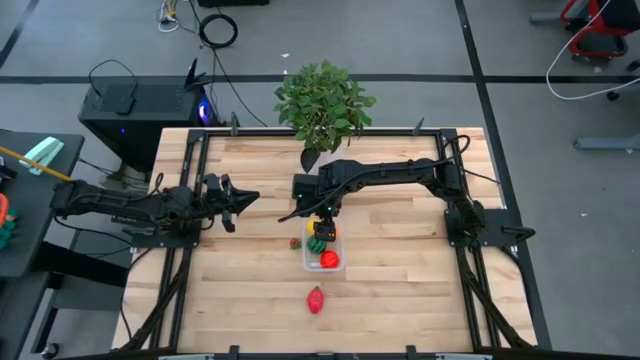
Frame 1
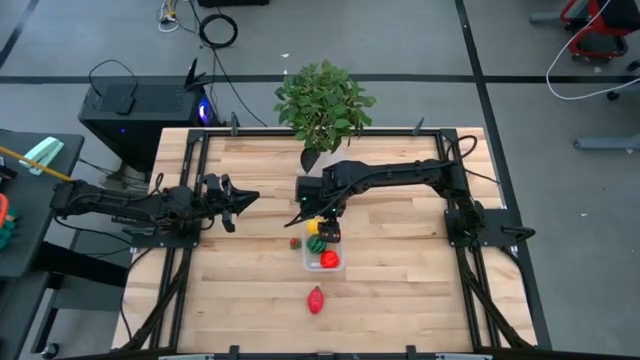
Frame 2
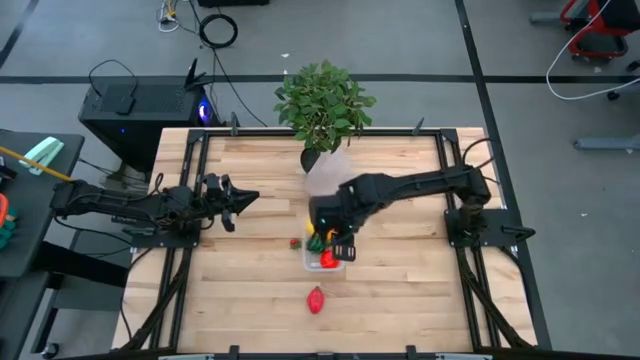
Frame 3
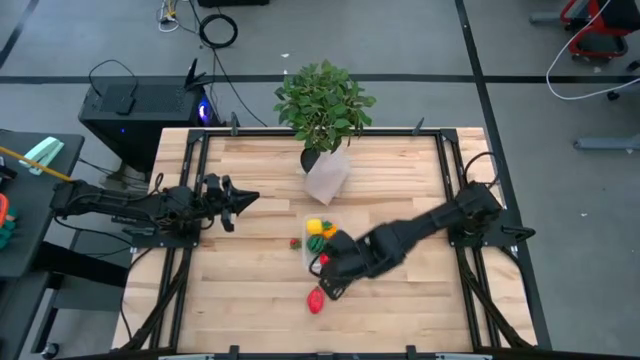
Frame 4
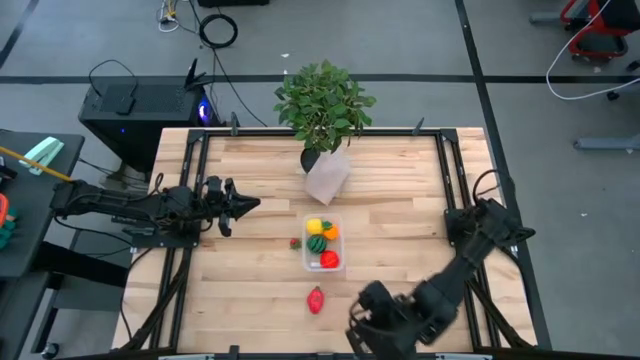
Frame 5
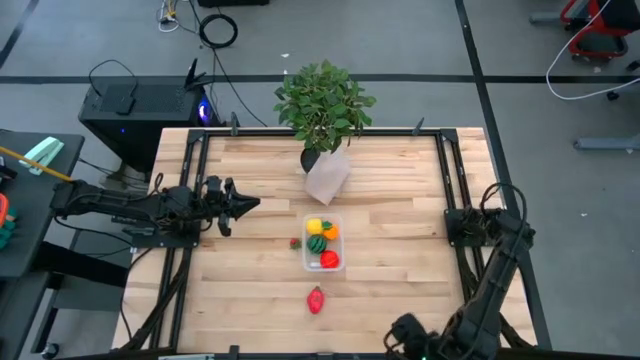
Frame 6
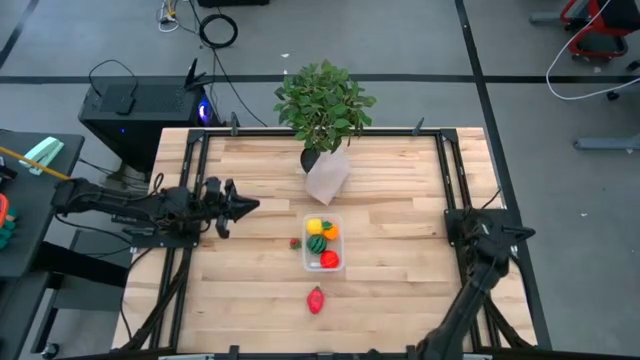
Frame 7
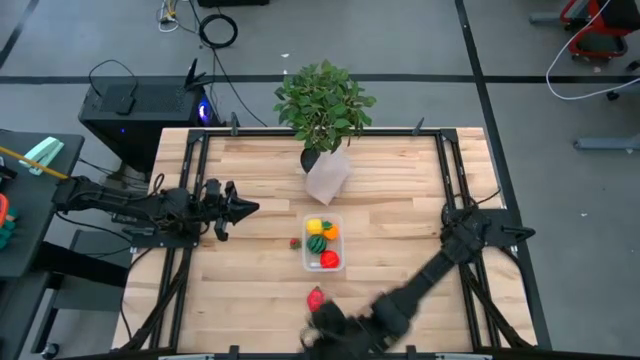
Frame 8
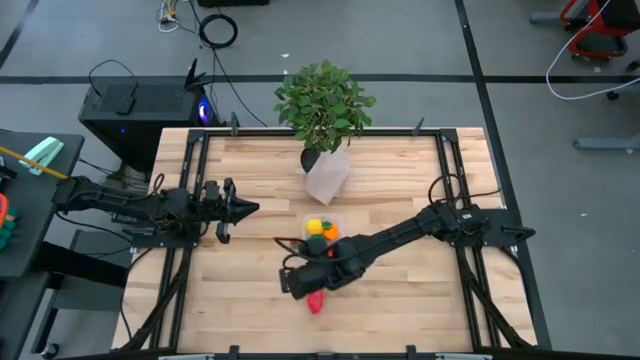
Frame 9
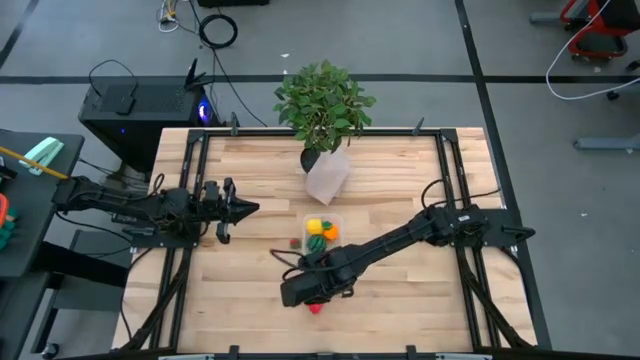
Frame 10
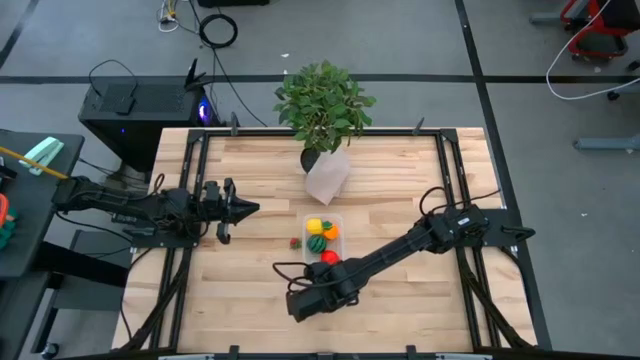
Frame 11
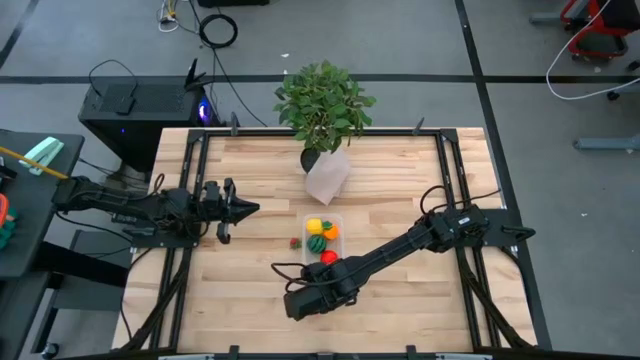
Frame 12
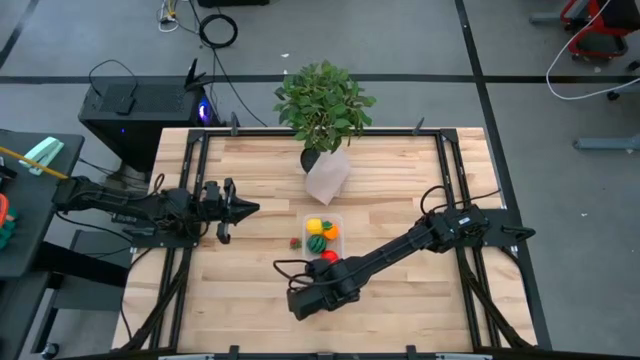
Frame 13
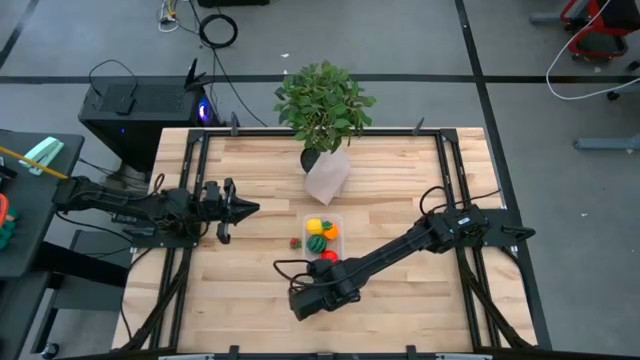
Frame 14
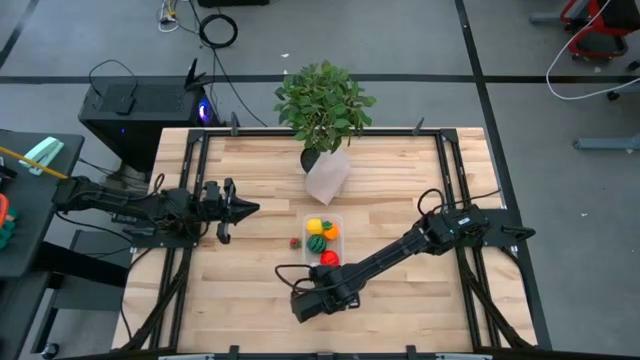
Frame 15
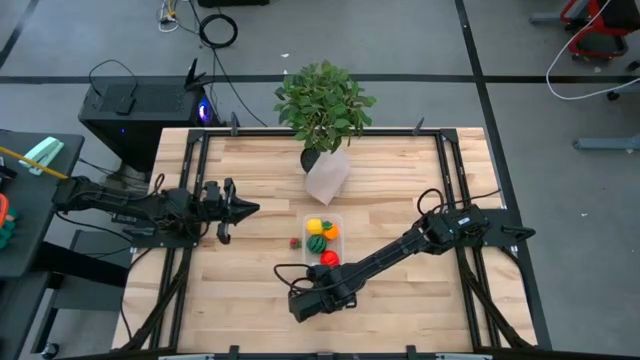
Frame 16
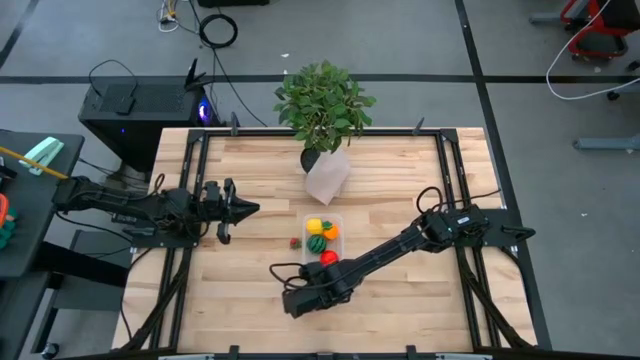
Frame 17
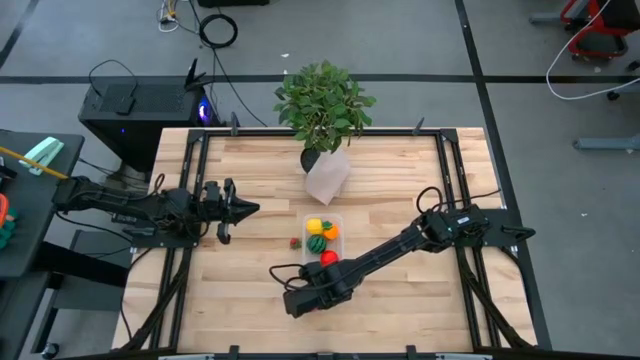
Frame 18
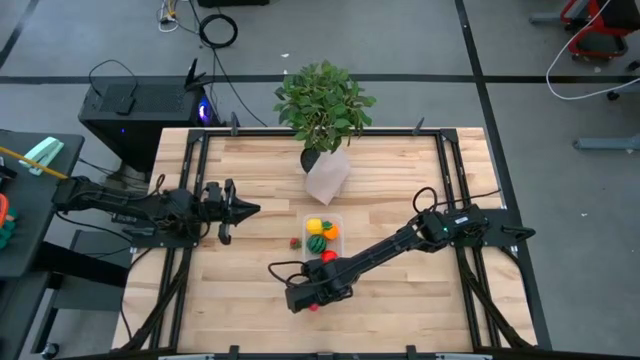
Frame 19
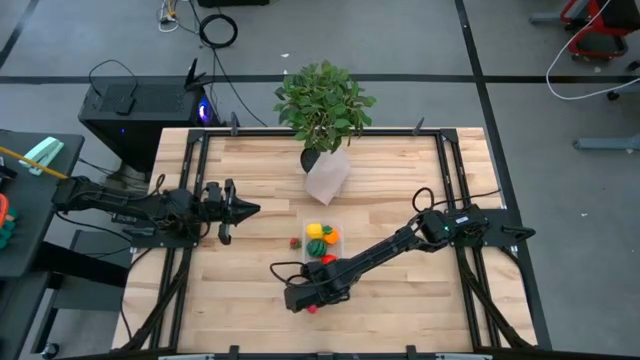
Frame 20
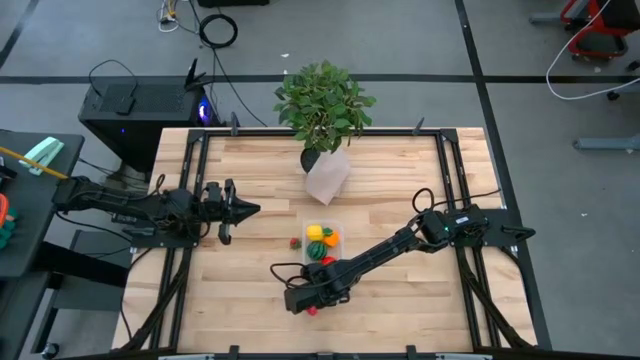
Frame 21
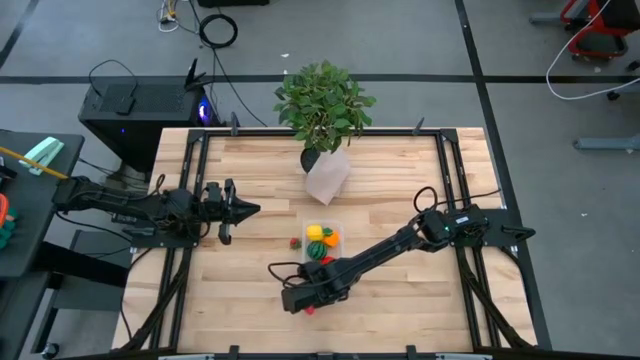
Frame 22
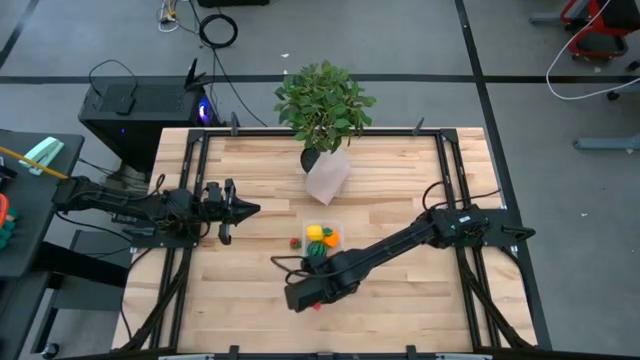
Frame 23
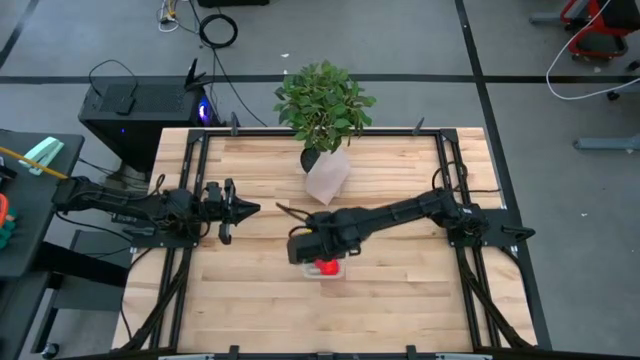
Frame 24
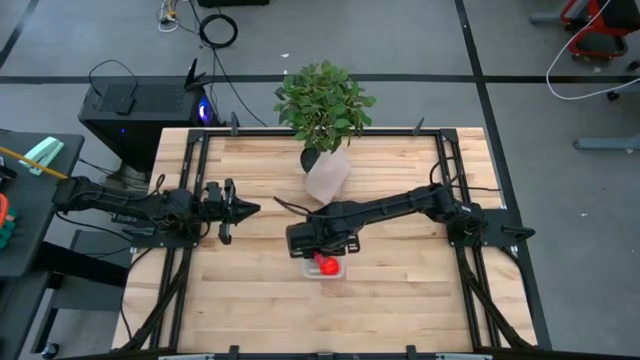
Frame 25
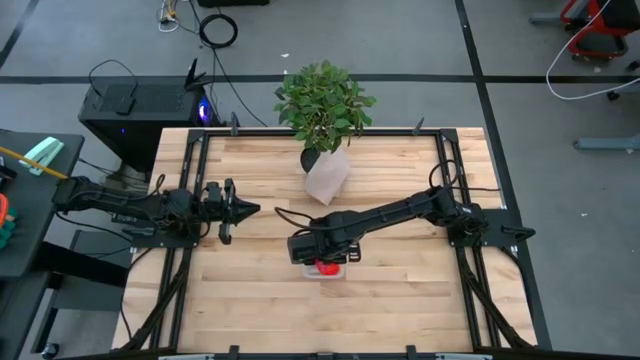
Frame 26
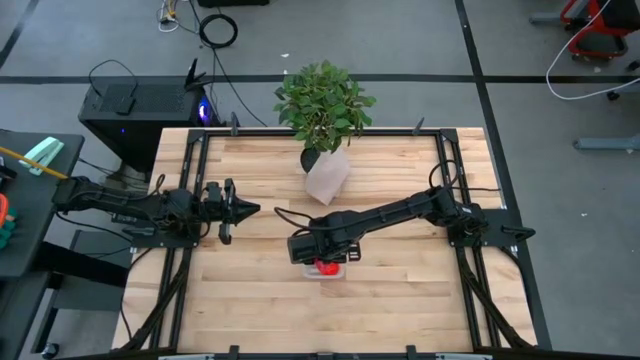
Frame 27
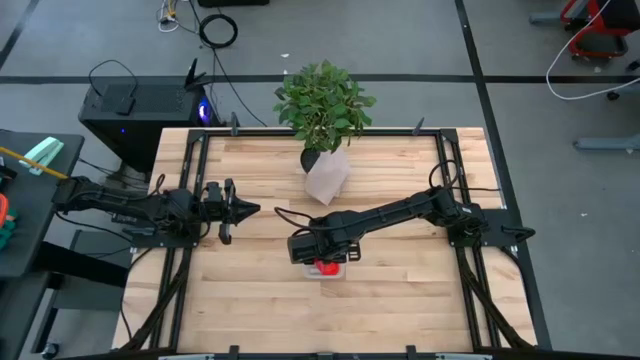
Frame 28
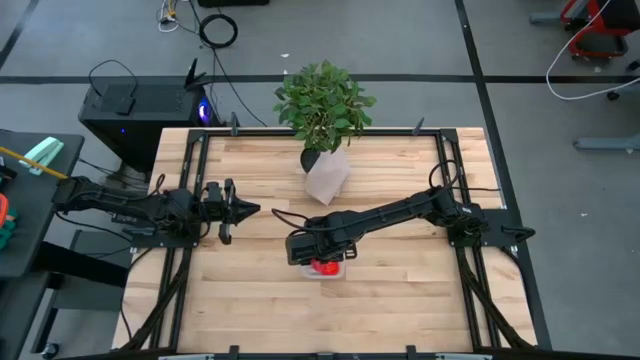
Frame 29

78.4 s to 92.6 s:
Task: Pick and placing Produce into tupperware
Put the red dragon fruit into the transparent bin

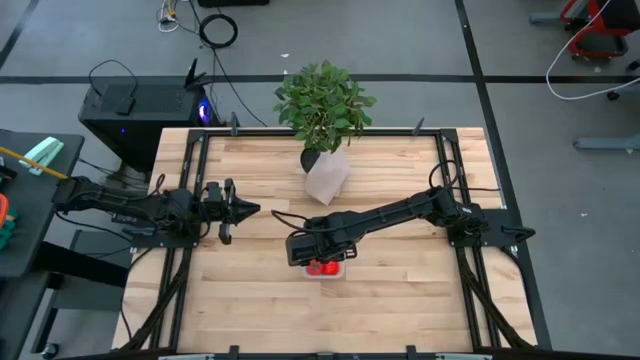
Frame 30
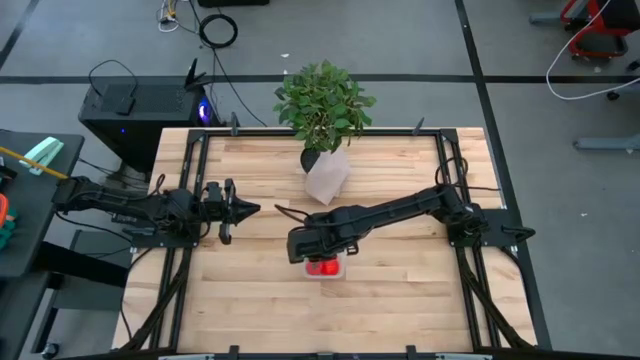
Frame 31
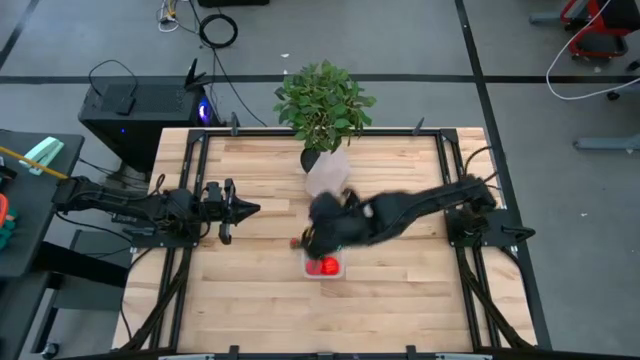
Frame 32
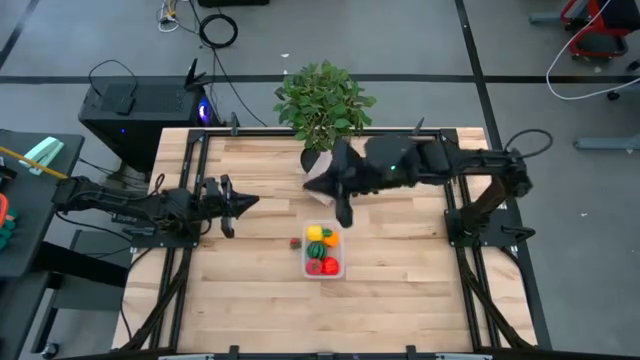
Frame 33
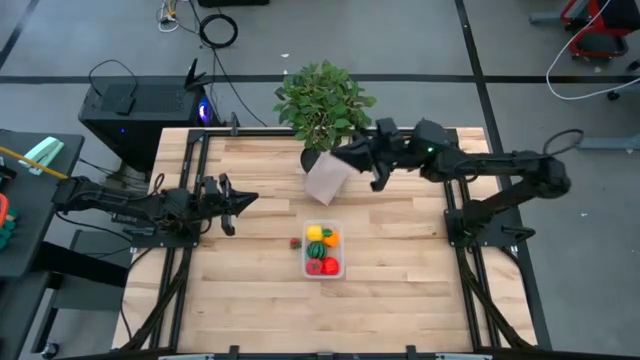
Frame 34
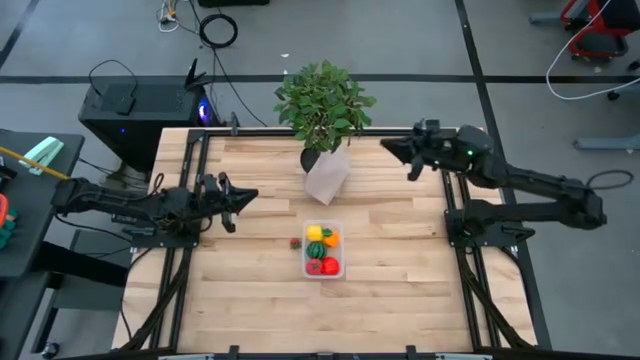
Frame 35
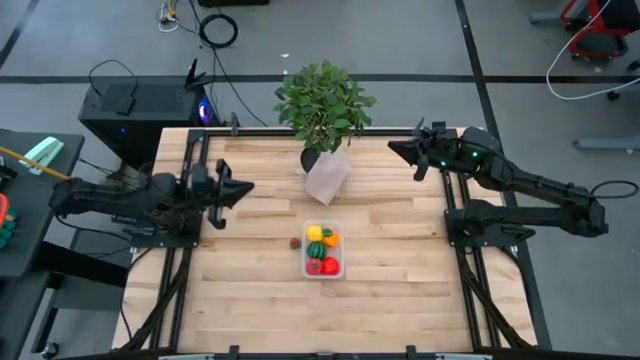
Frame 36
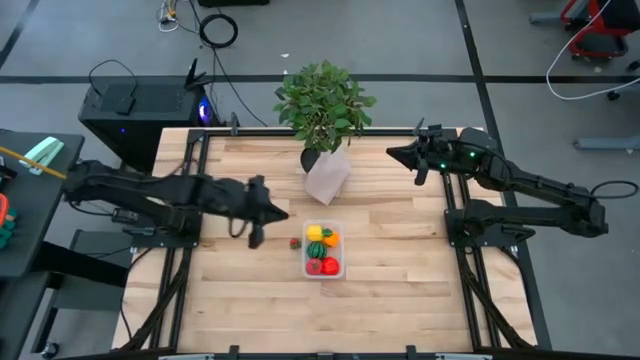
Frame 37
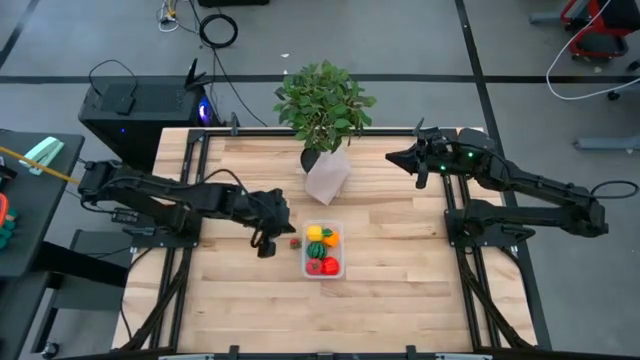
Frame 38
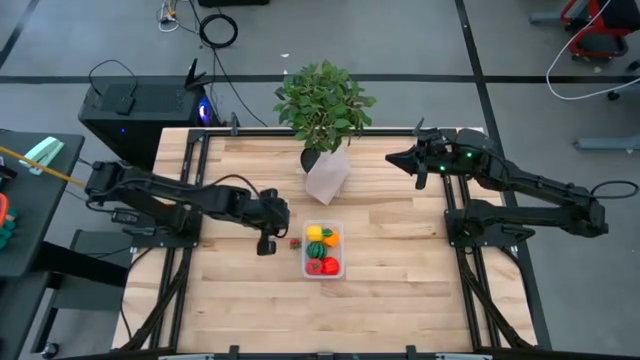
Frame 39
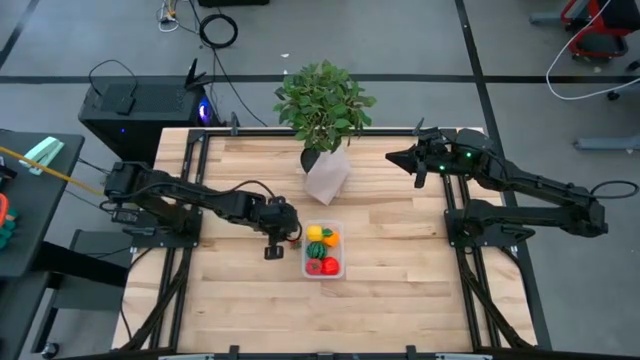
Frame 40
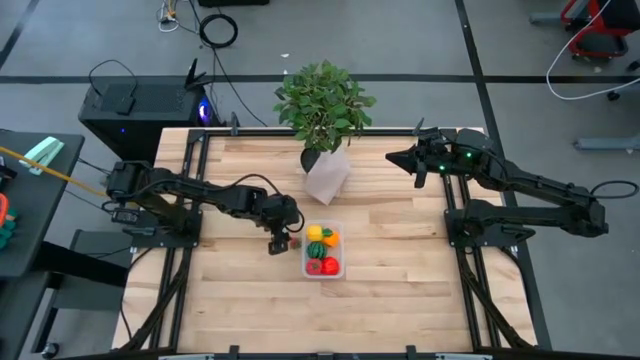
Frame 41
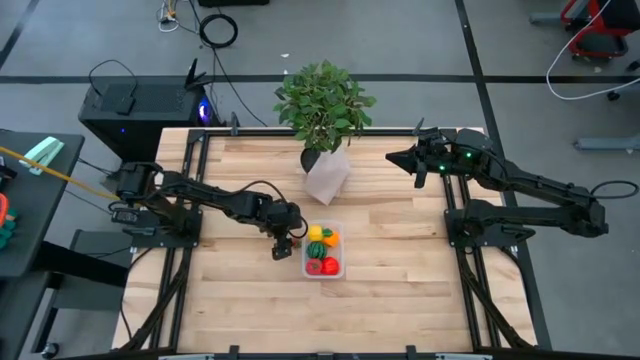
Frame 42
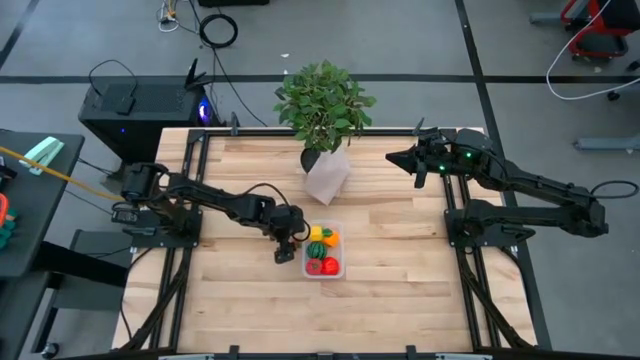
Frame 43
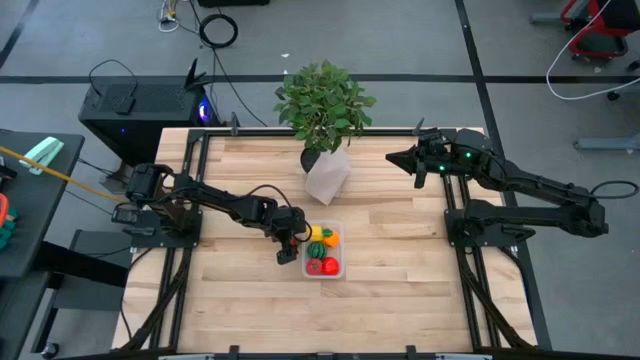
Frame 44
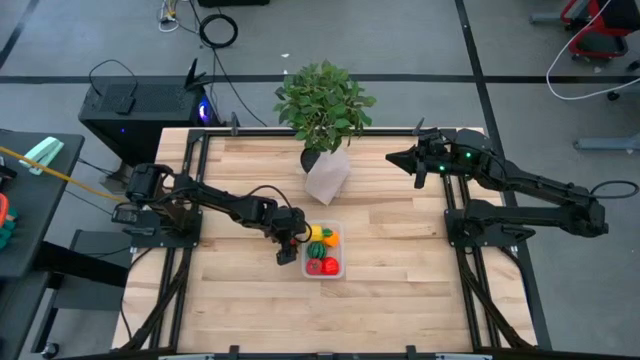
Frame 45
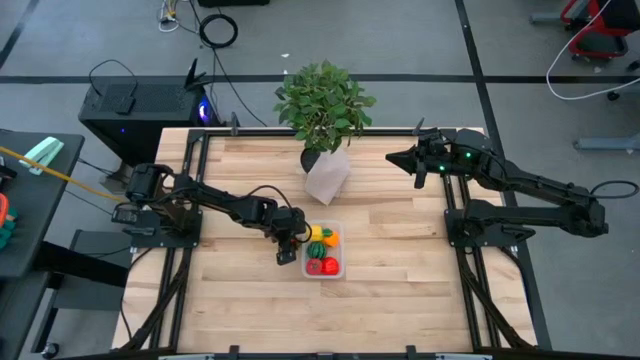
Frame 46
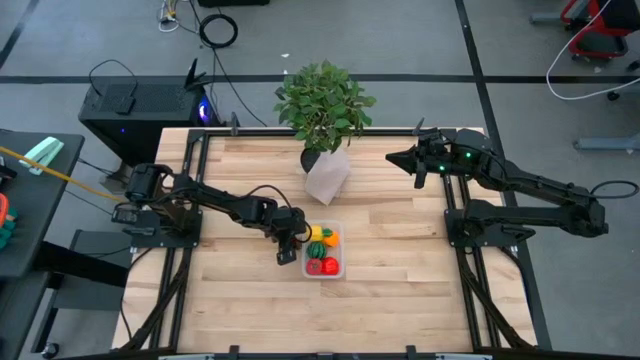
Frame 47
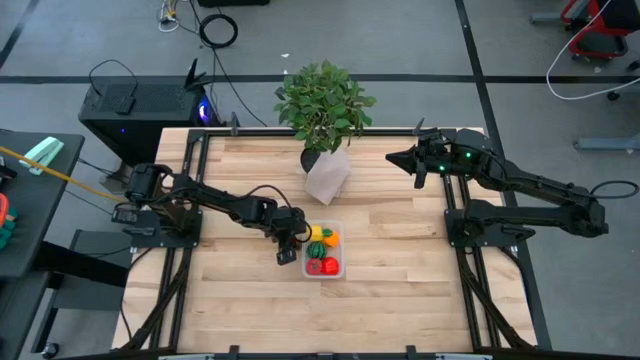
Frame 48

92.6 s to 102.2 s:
Put the red strawberry into the transparent bin
